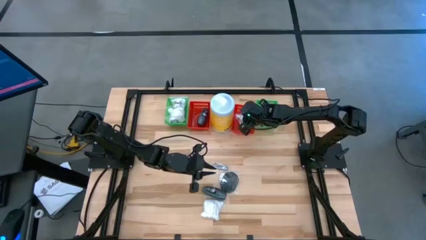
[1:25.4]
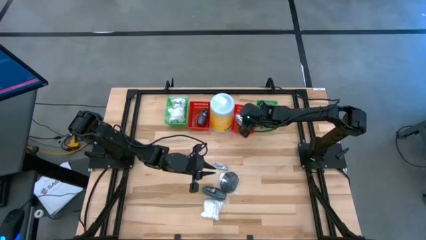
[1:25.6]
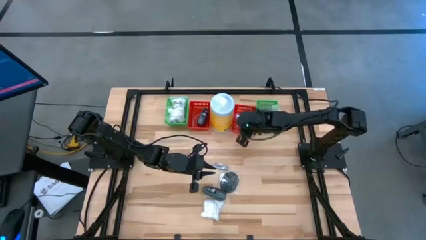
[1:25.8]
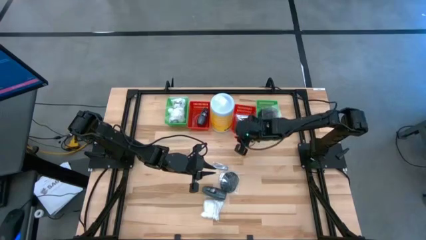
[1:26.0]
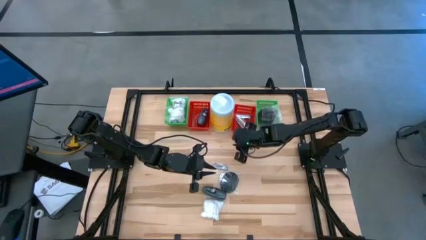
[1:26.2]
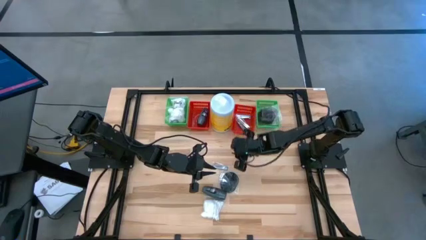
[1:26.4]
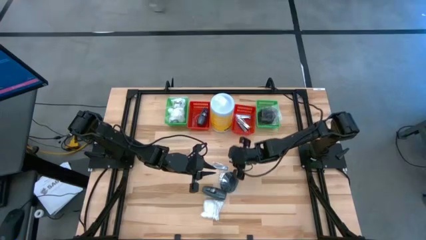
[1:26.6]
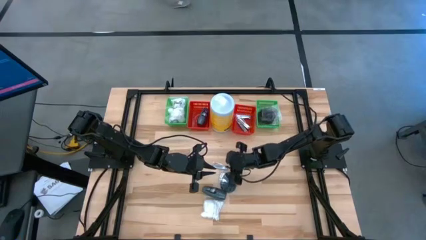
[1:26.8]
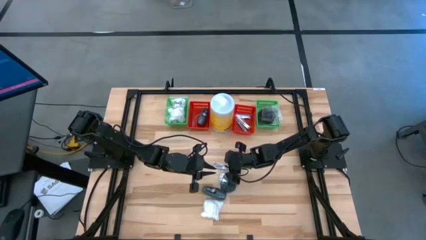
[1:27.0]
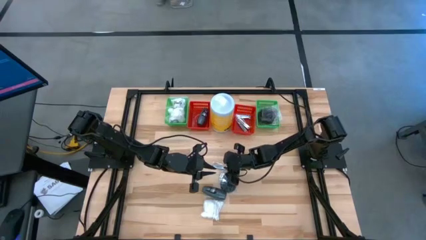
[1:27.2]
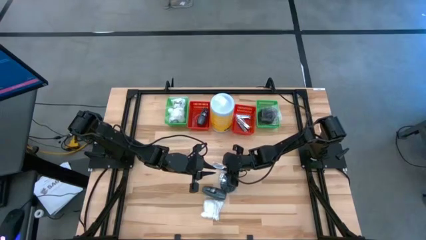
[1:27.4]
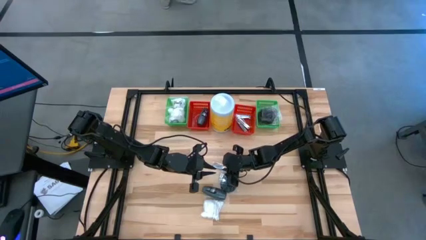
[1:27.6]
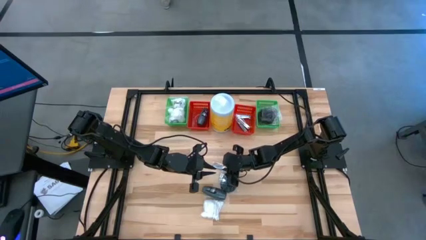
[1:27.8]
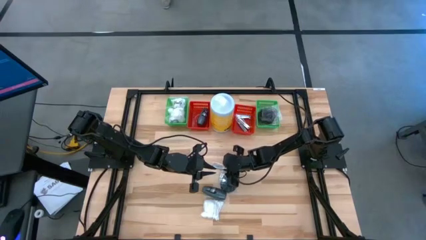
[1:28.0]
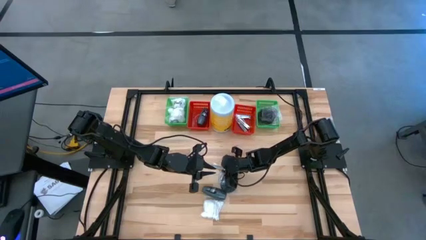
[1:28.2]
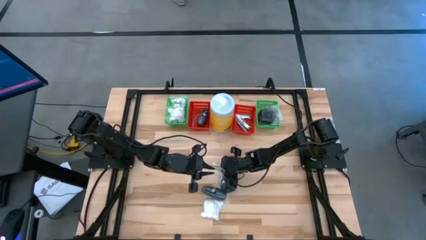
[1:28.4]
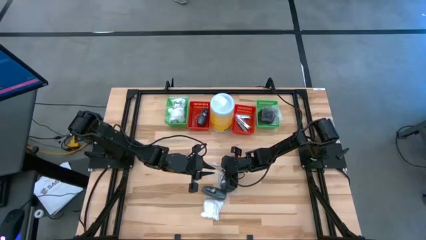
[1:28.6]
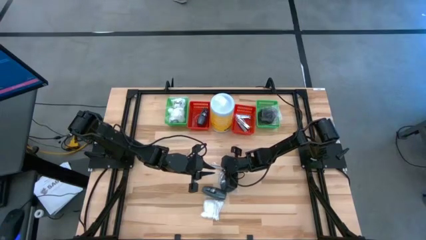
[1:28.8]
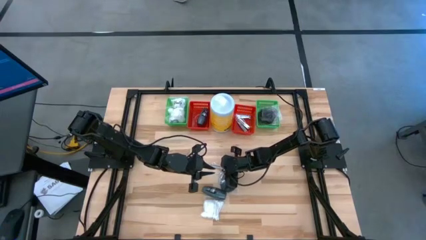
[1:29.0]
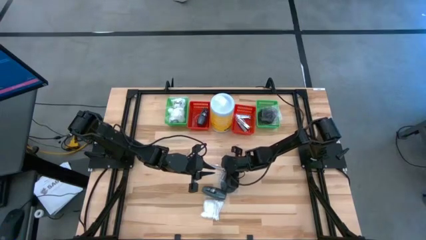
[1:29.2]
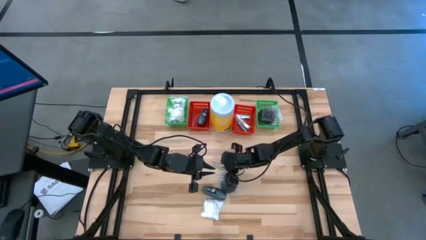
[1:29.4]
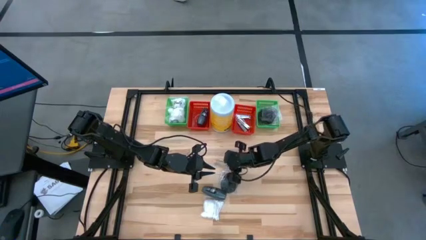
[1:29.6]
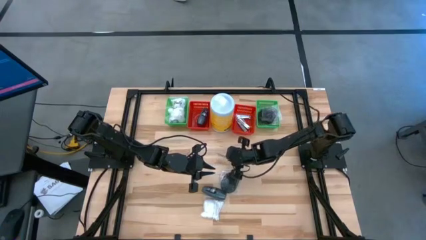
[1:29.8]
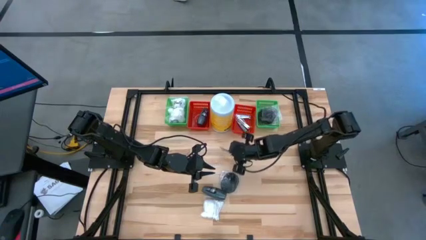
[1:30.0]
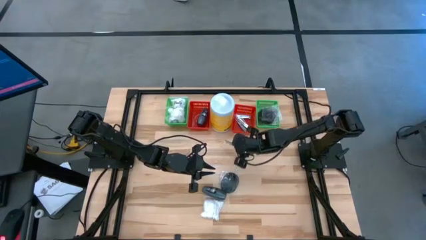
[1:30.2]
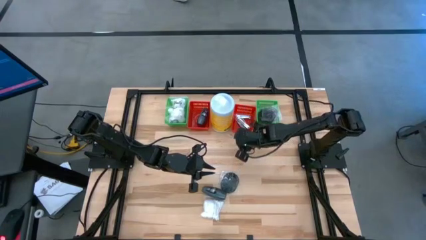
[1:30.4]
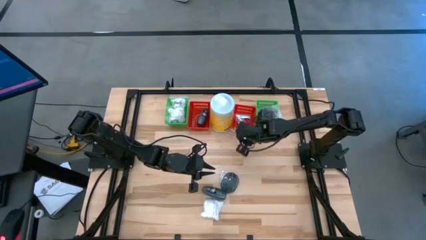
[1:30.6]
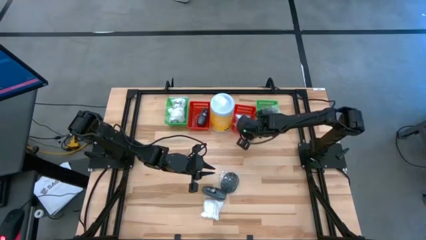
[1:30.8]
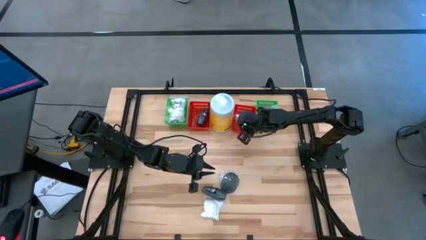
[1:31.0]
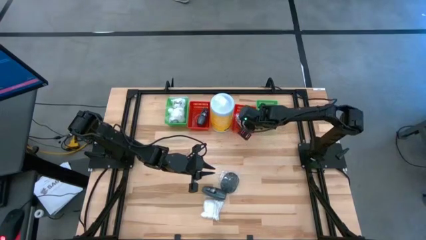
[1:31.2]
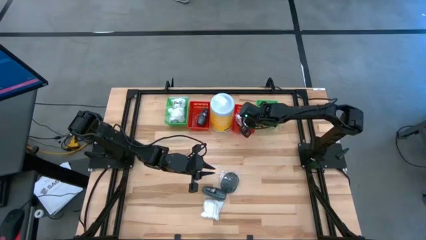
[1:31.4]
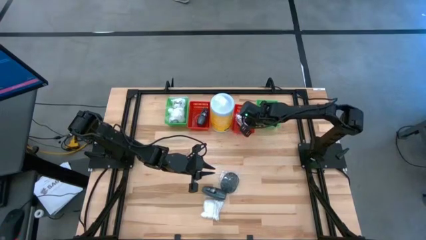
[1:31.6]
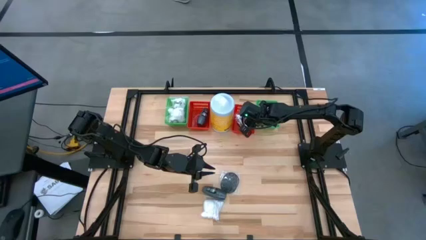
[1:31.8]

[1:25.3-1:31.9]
Task: Pick & Place Travel size toiletries
Put the silver nail cutter into the right red bin

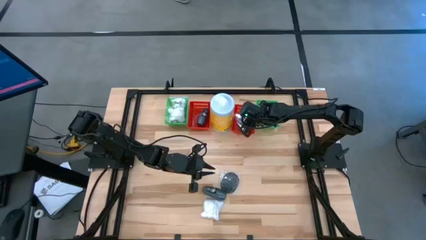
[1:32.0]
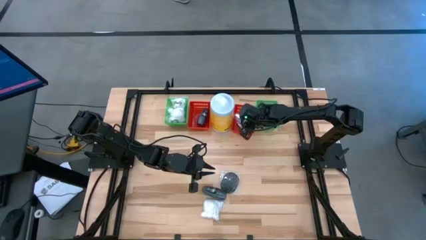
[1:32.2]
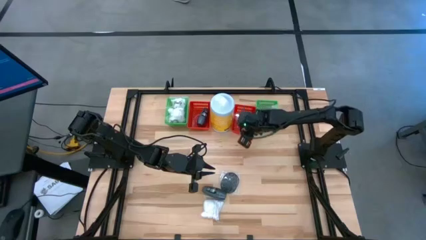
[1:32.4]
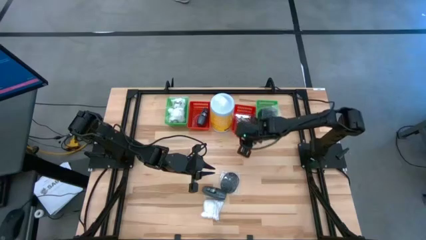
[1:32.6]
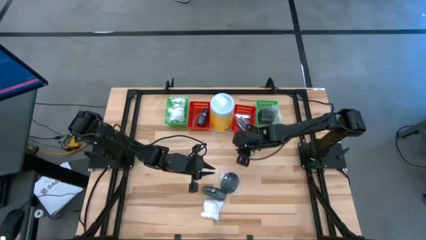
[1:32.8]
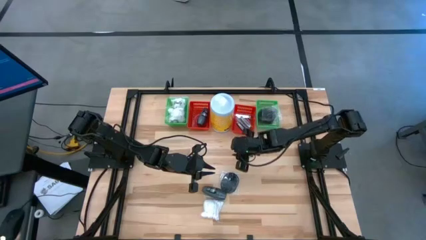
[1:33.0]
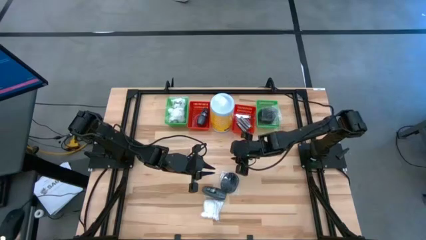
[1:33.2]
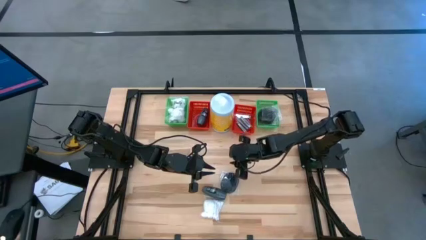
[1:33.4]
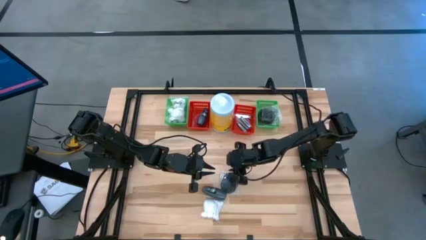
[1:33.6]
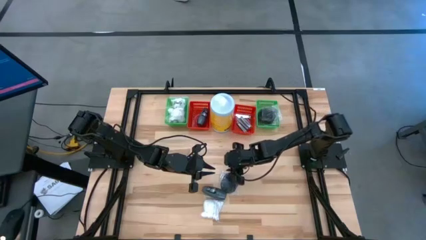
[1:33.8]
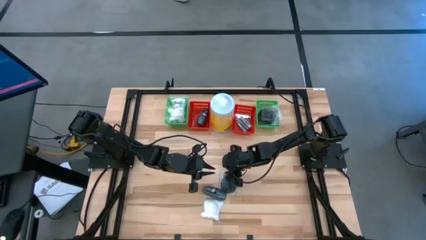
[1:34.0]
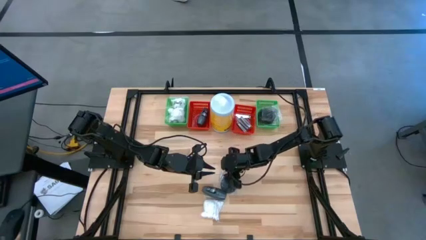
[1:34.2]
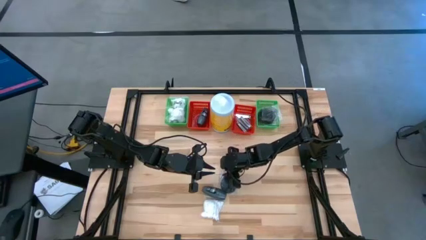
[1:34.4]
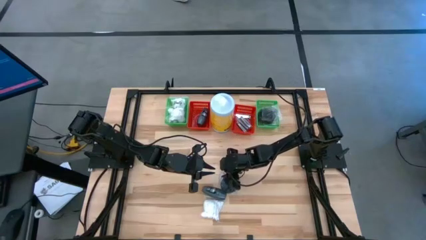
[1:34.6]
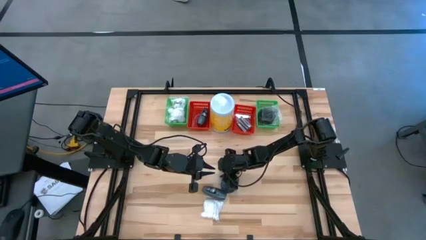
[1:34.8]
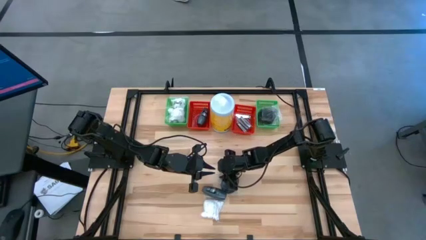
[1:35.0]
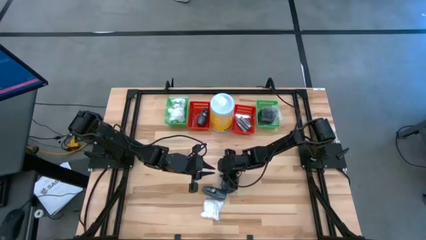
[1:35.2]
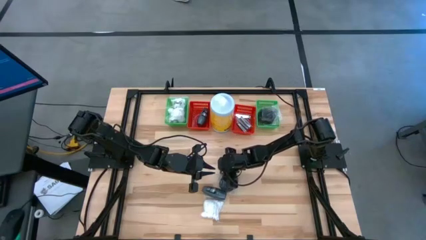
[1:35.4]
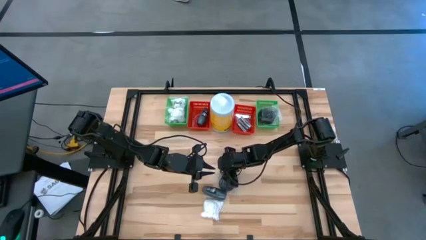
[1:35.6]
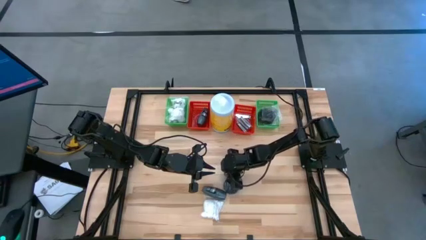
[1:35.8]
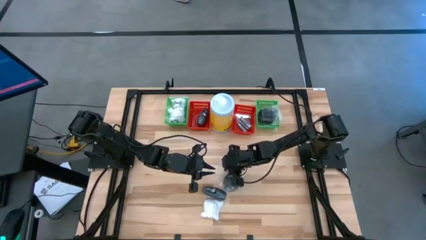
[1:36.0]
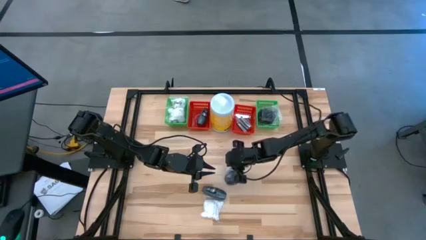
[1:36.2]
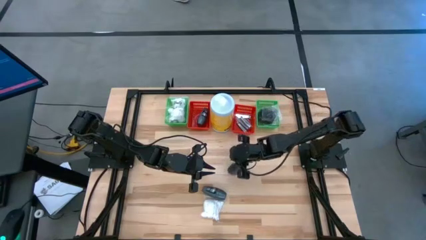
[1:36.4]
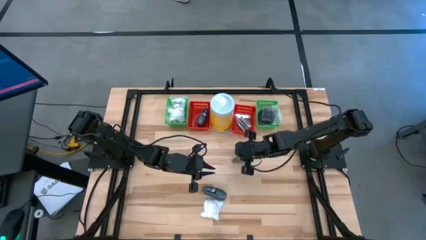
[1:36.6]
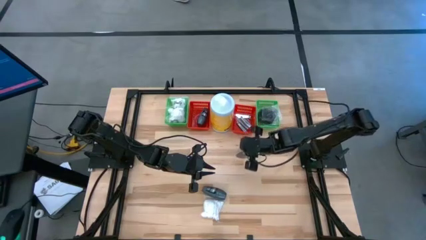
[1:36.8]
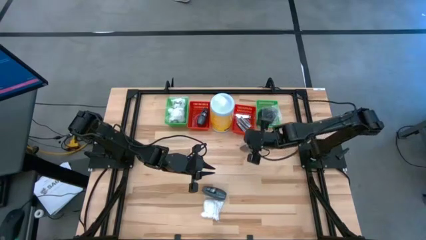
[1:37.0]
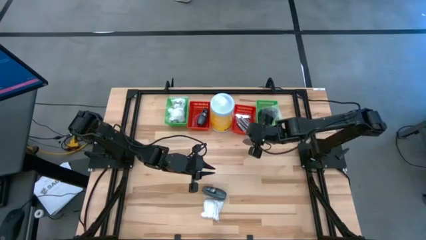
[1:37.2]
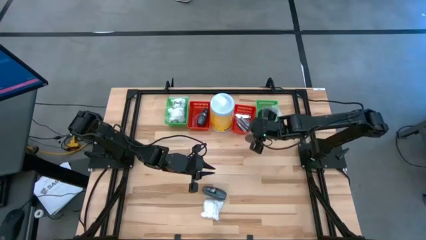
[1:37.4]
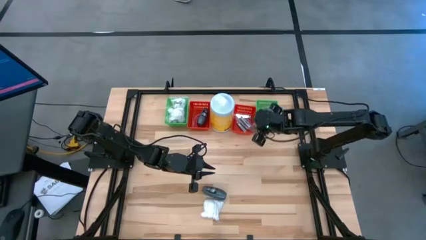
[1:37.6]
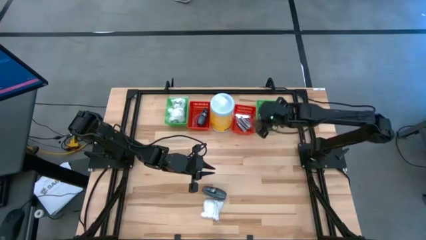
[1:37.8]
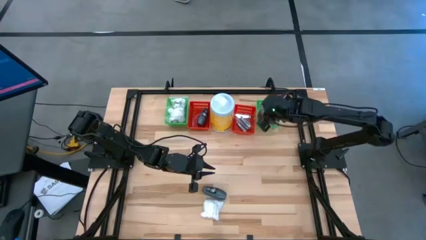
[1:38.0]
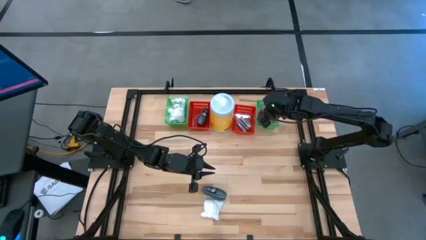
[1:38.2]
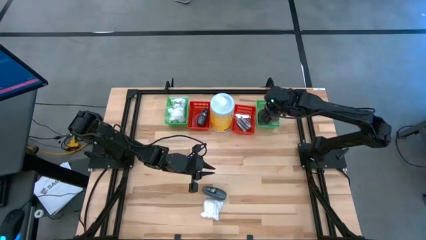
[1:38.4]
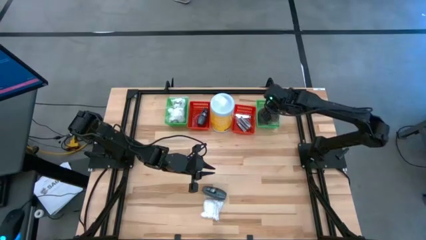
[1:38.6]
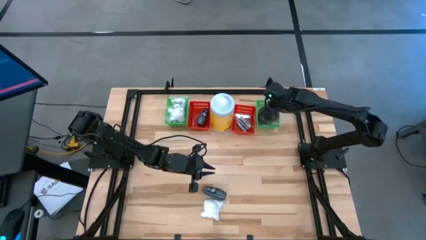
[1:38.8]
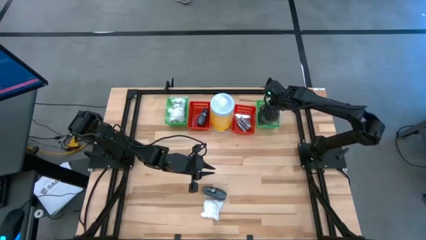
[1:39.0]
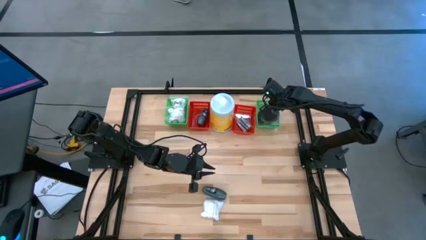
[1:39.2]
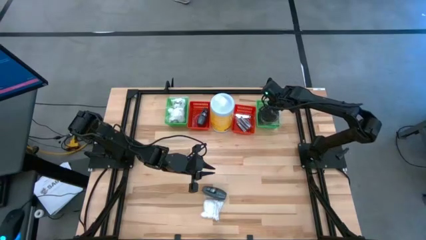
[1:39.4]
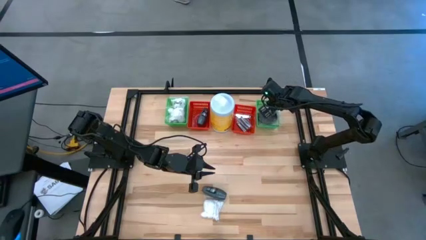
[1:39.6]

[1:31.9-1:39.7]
Put the black hairbrush into the right green bin

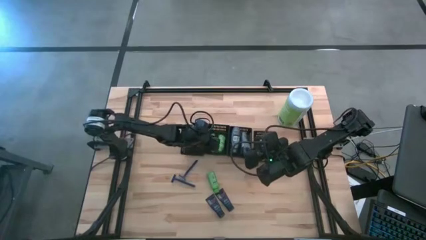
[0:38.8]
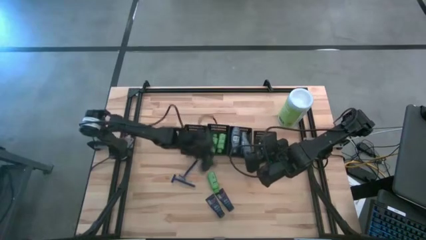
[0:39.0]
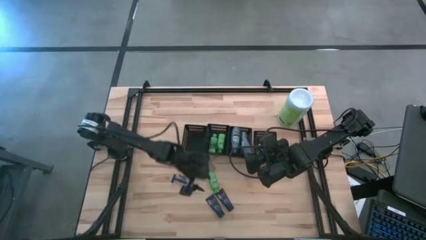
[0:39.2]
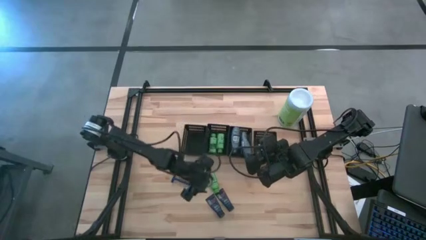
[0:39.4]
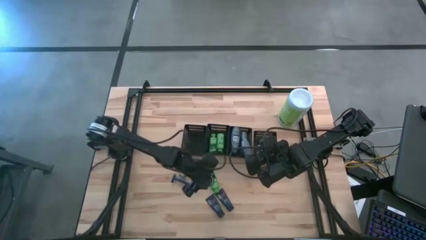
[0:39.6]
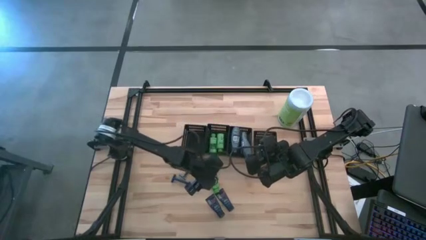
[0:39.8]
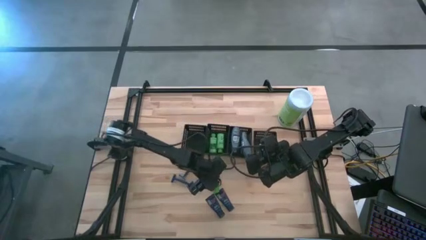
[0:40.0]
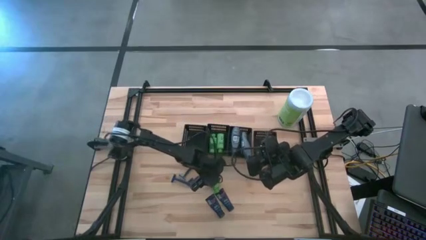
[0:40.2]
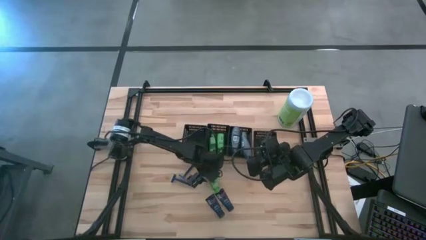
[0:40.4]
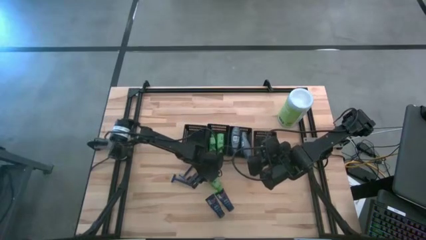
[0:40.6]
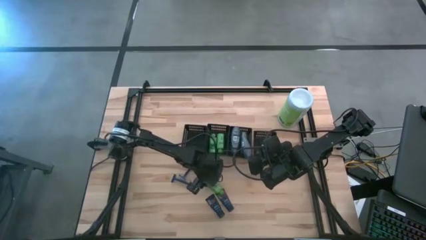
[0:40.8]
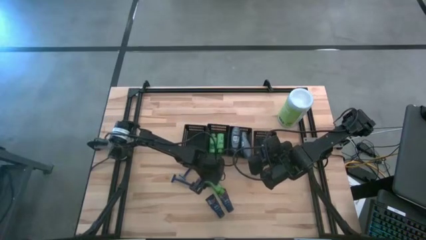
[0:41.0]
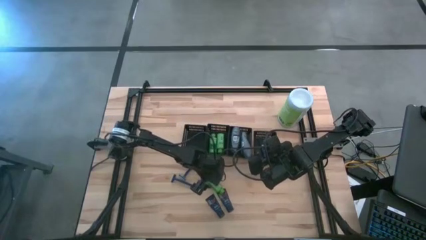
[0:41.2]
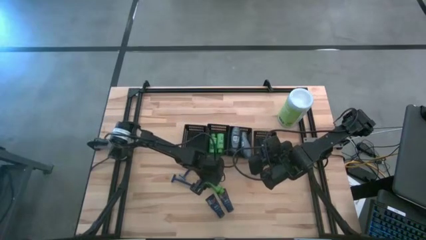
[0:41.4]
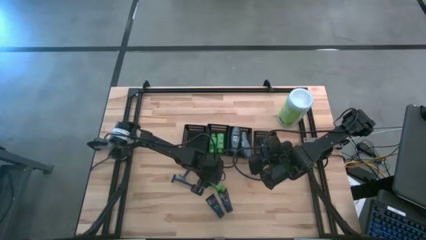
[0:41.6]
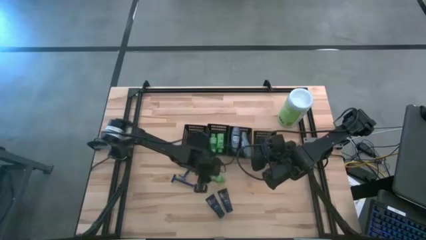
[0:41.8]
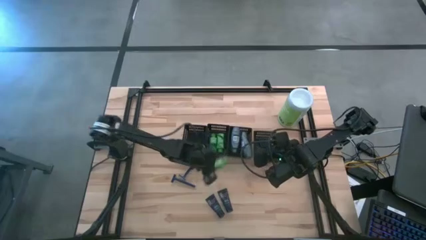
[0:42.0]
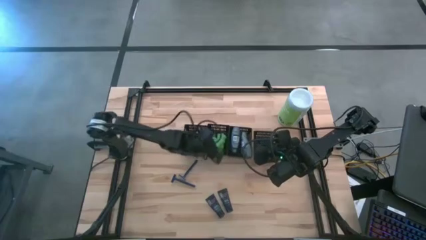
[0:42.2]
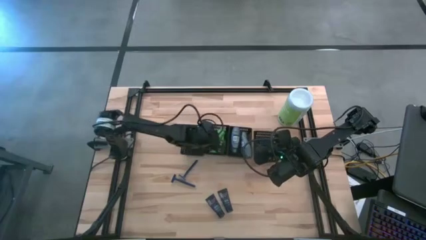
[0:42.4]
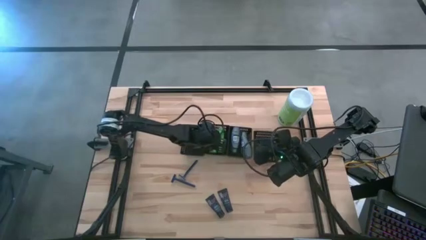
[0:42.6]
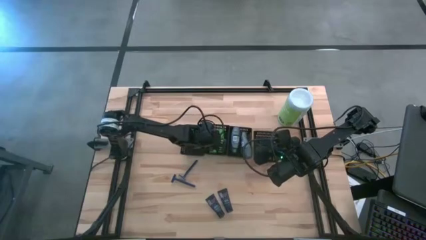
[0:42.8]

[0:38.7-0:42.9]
Task: Pick & Place Travel size toiletries
Put the shampoo into the middle left black bin
